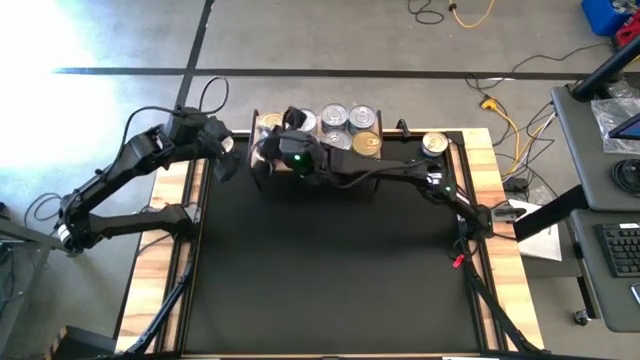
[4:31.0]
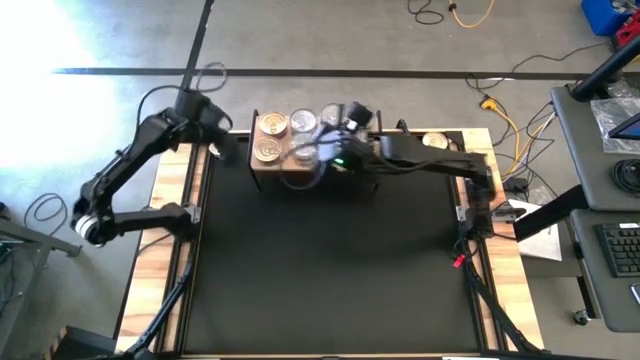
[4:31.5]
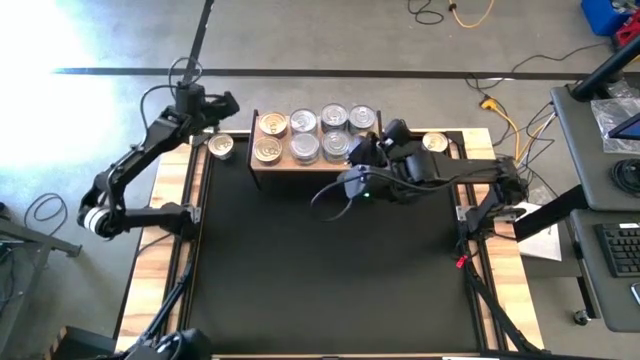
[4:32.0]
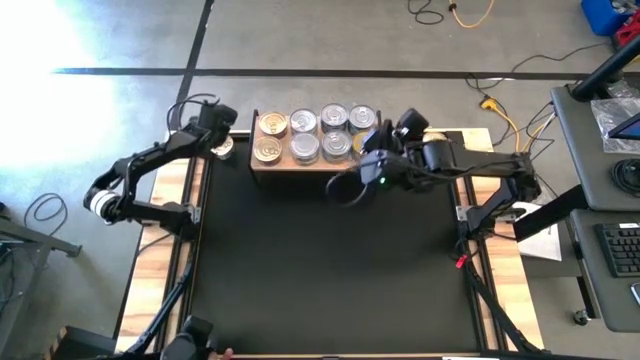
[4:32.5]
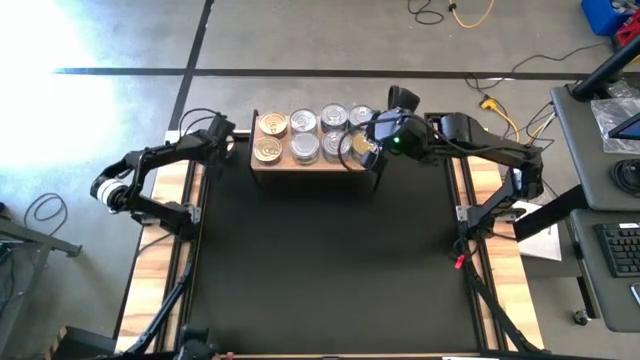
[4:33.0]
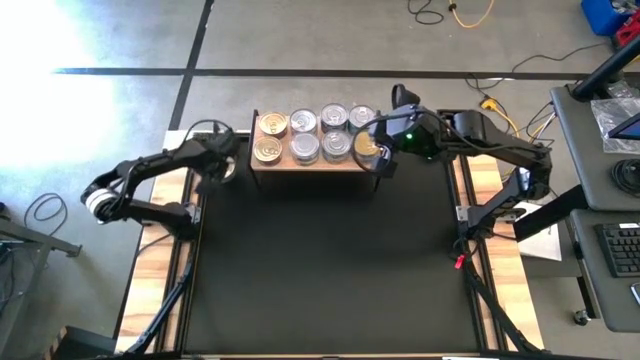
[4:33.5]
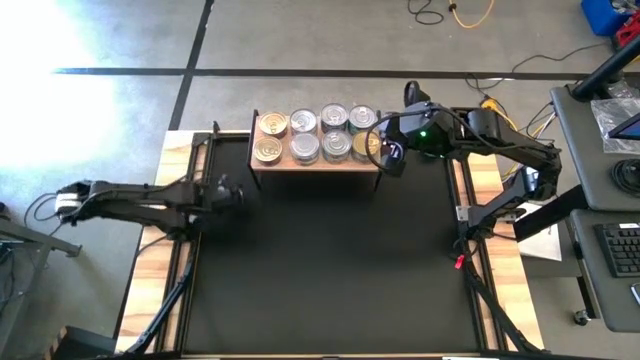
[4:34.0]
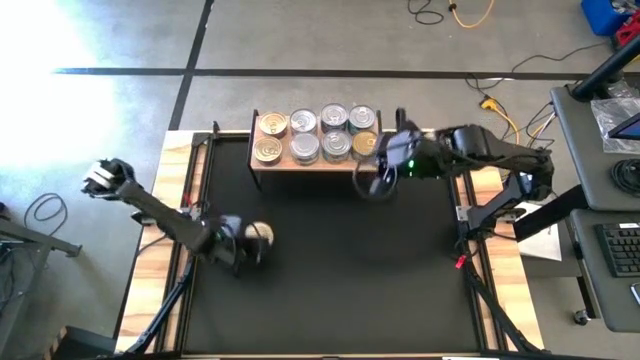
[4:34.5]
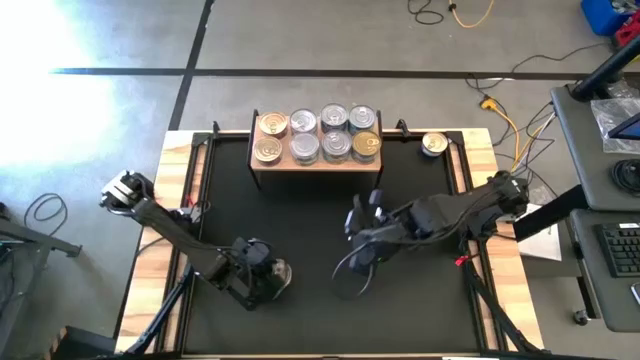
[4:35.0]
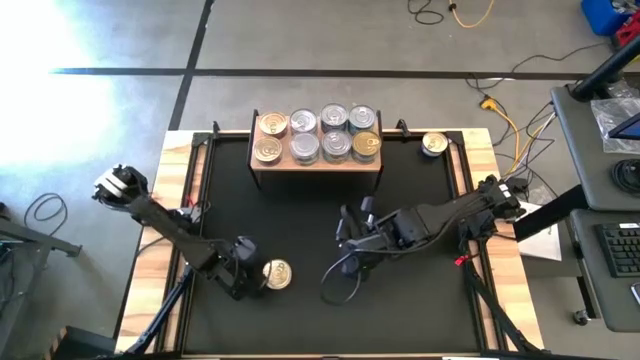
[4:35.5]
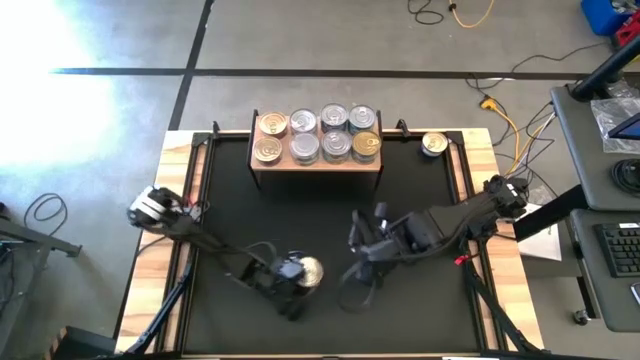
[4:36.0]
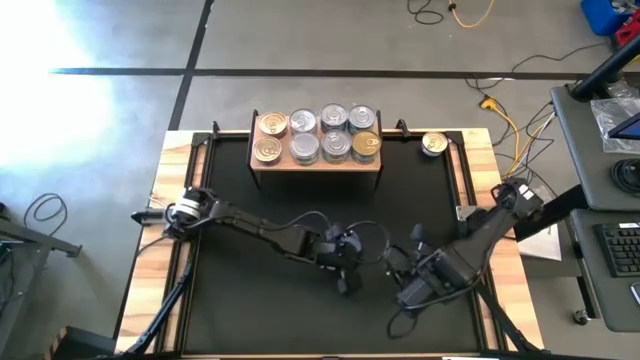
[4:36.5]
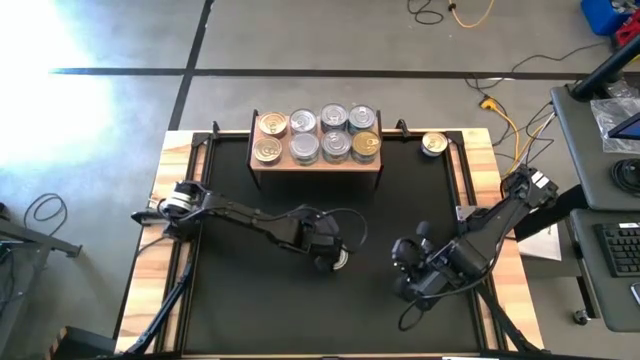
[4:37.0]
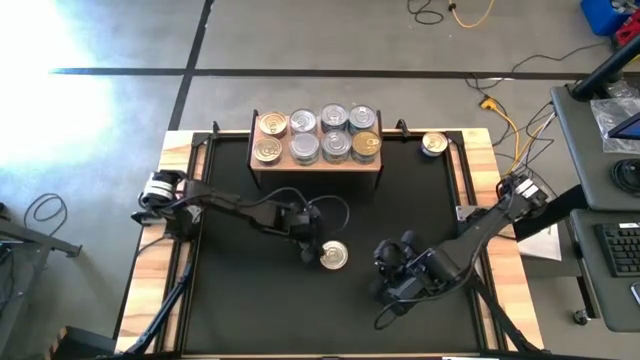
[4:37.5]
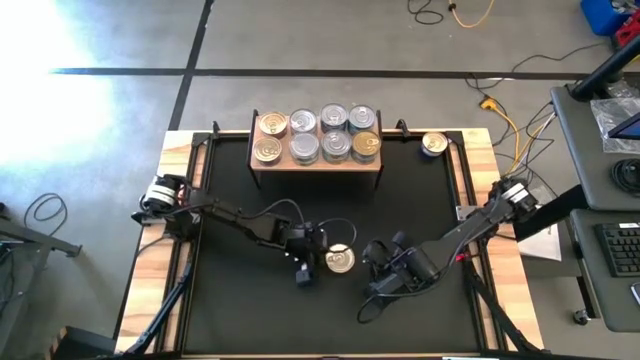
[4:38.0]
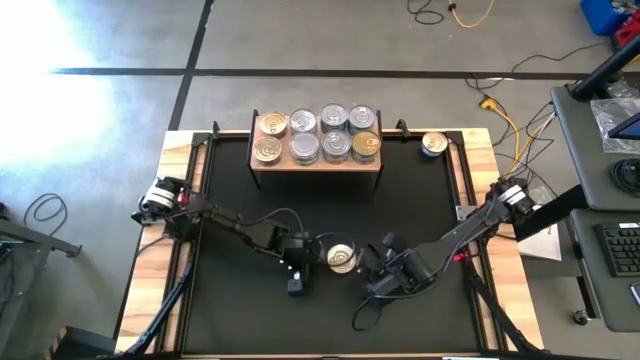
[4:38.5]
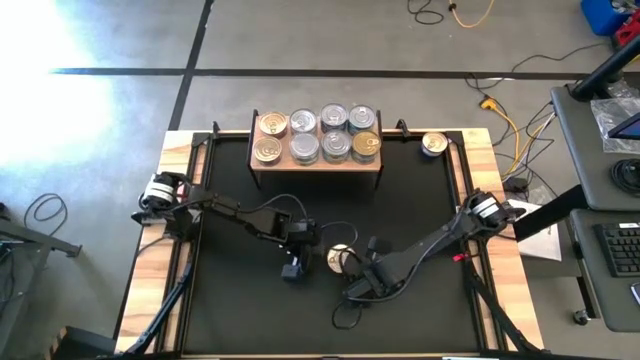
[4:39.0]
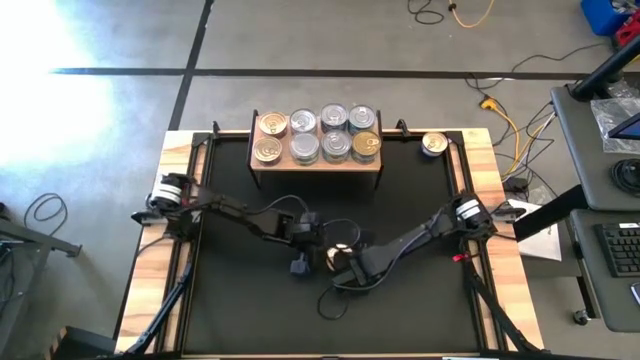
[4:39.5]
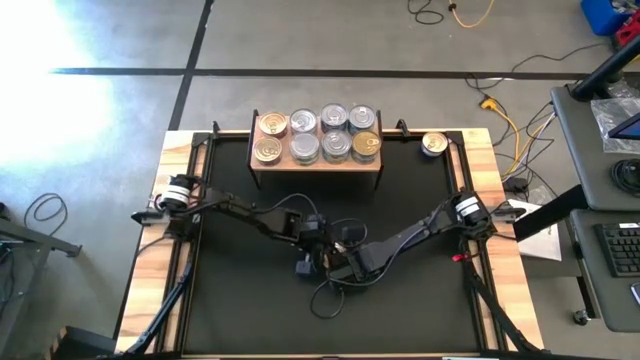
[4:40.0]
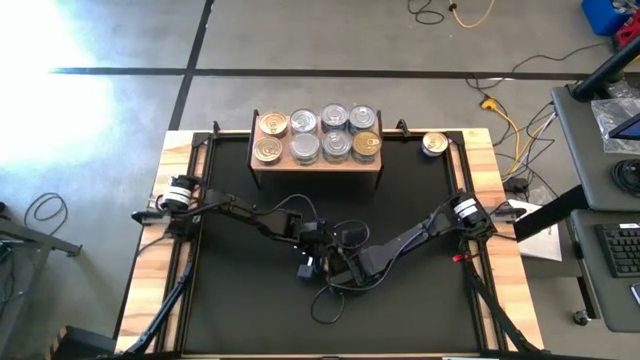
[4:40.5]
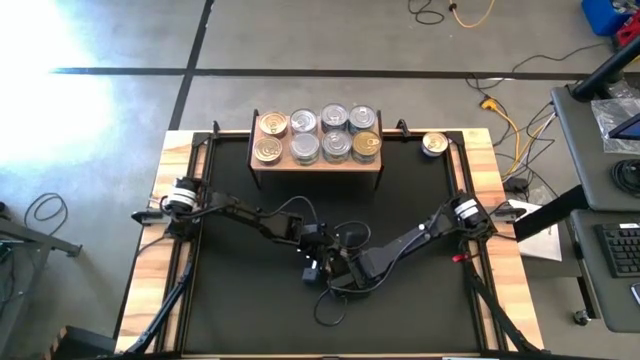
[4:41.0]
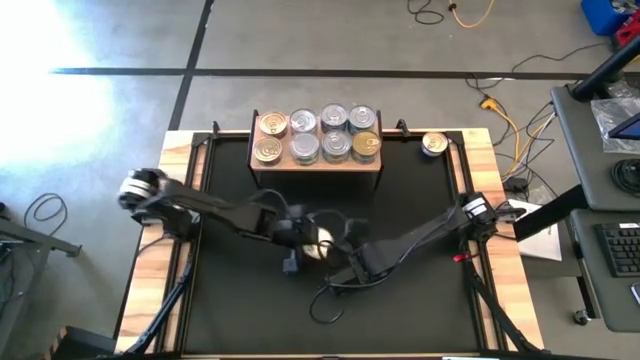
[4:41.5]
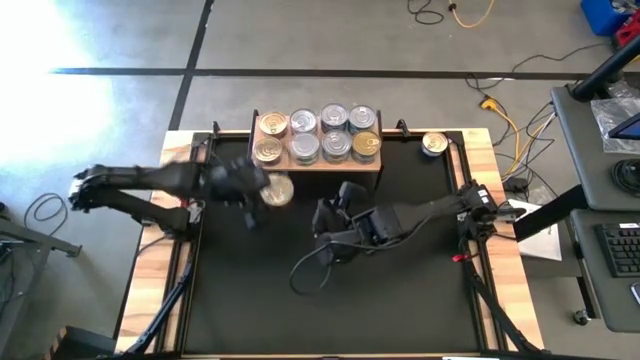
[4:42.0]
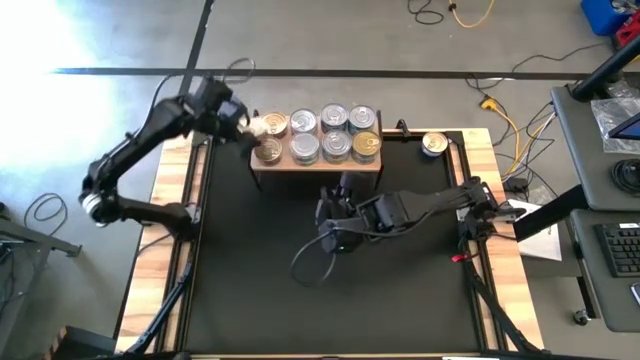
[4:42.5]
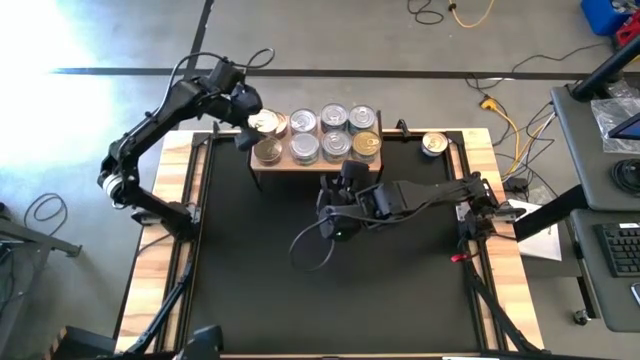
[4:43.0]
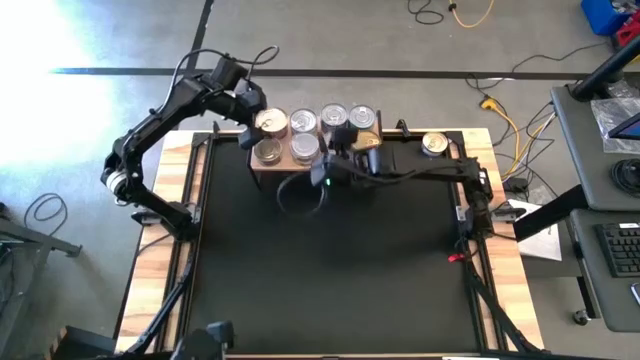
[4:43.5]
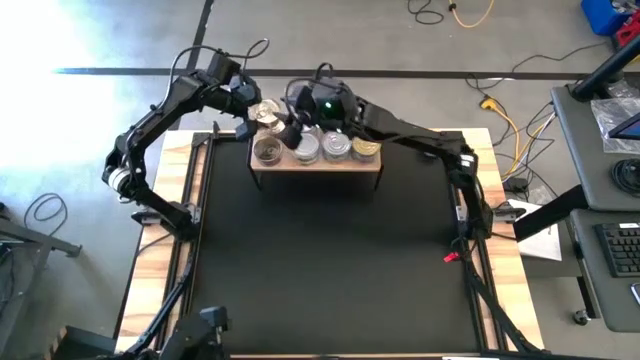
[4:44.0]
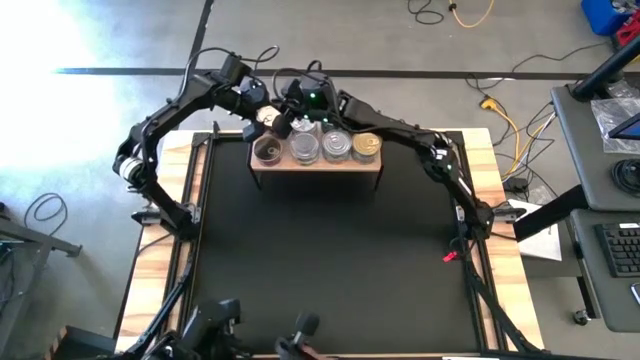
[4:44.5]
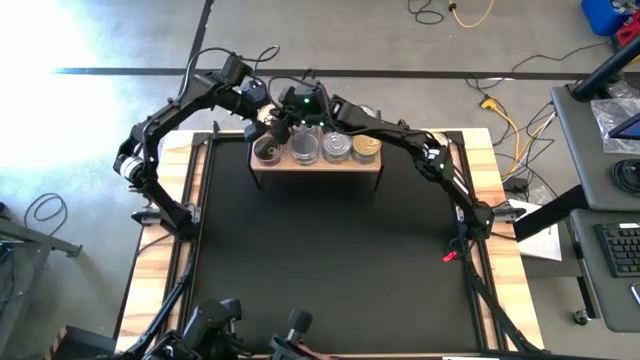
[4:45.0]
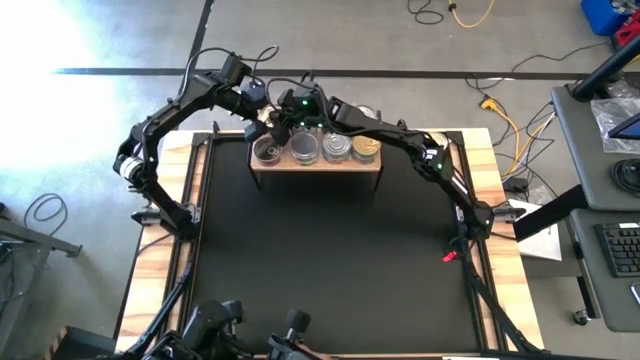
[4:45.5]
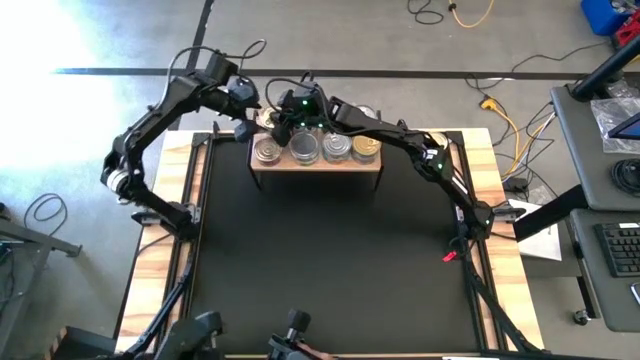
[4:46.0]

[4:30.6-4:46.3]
Task: Stack canned seafood by type on shelf
Stack the left blue pink tuna can on the top of the top blue pink tuna can on the shelf

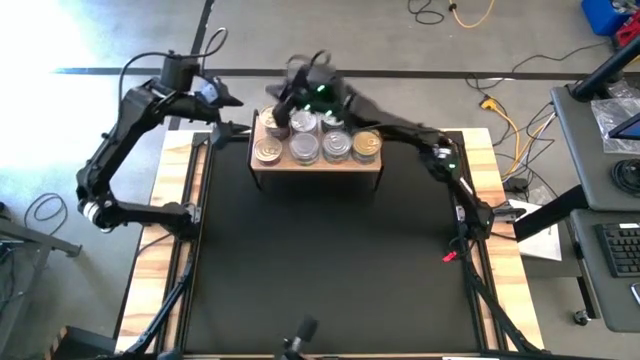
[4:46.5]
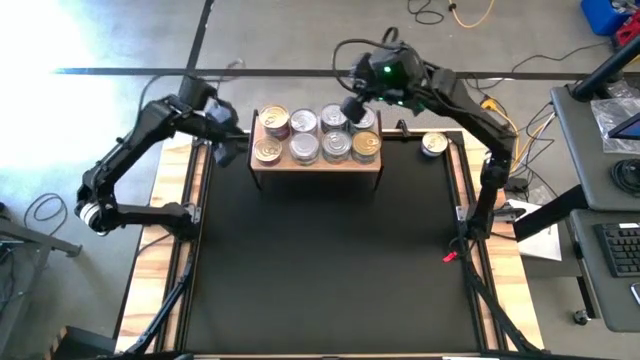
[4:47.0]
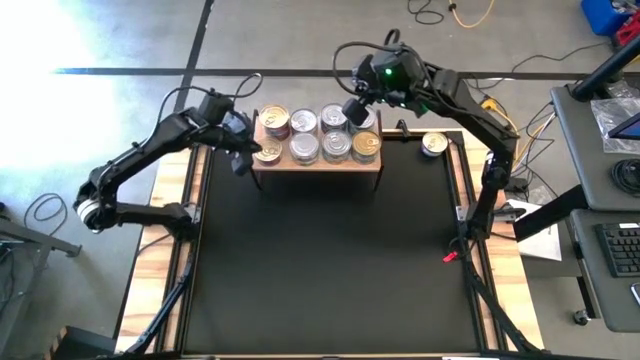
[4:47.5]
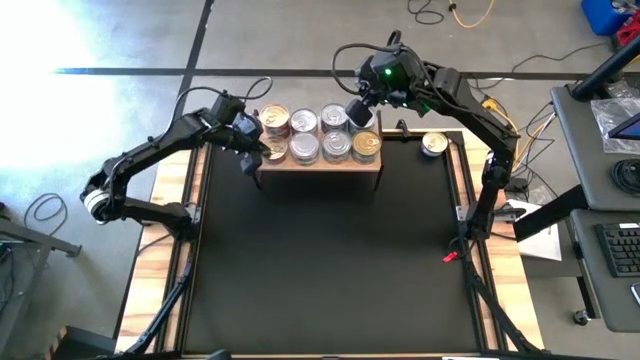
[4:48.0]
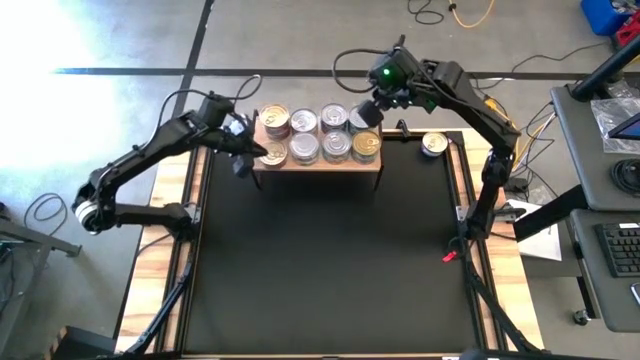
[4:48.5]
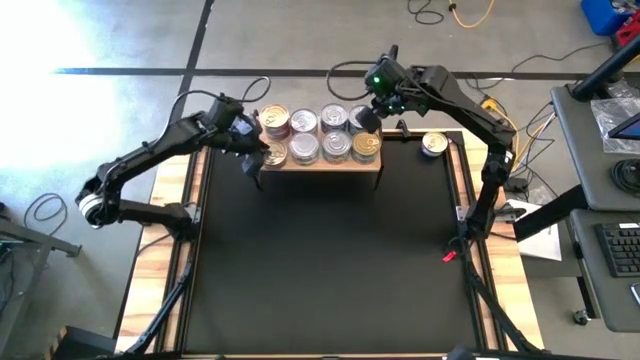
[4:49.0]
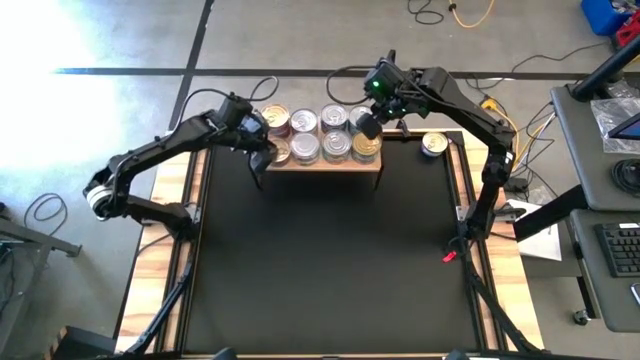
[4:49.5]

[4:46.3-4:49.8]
Adjust the bottom blue pink tuna can on the shelf

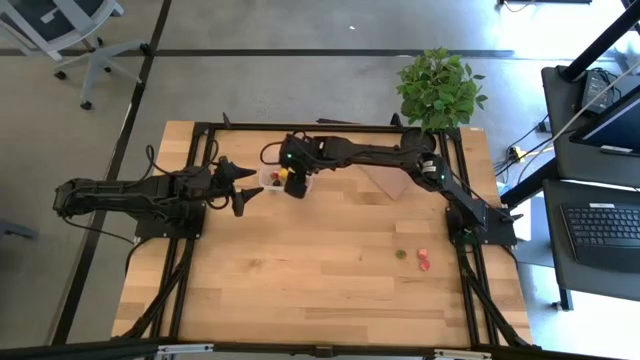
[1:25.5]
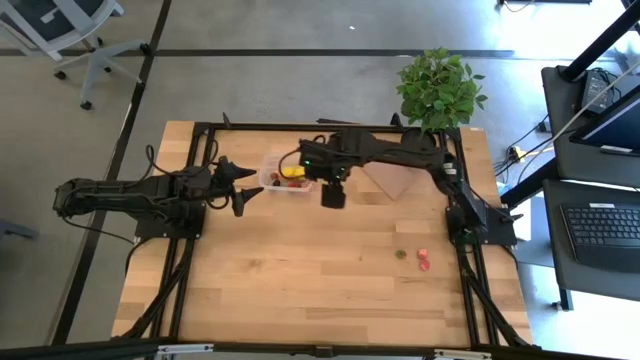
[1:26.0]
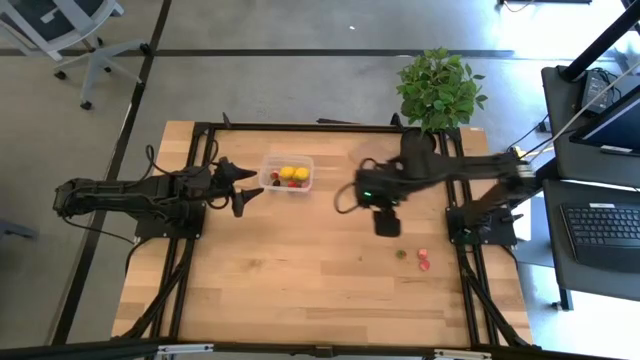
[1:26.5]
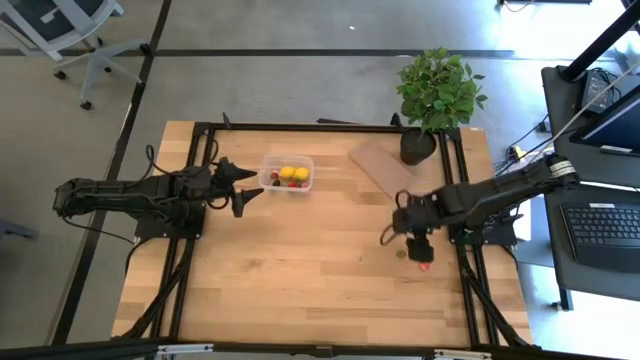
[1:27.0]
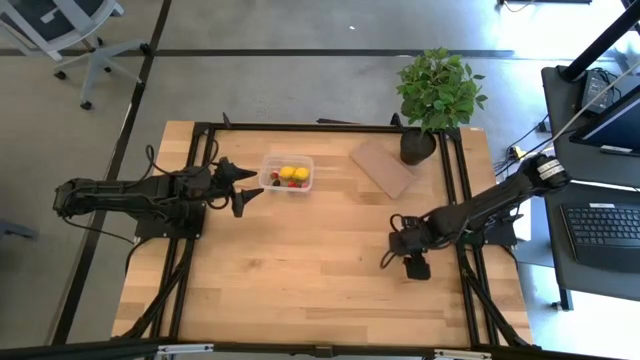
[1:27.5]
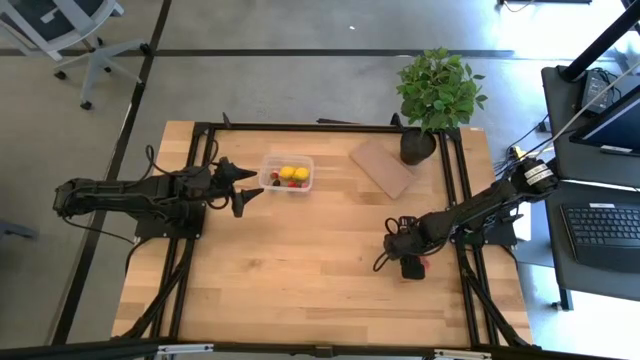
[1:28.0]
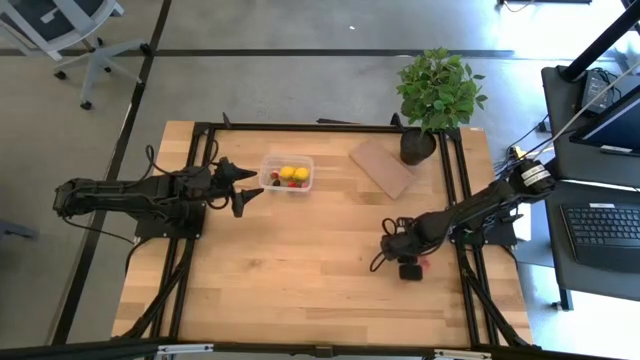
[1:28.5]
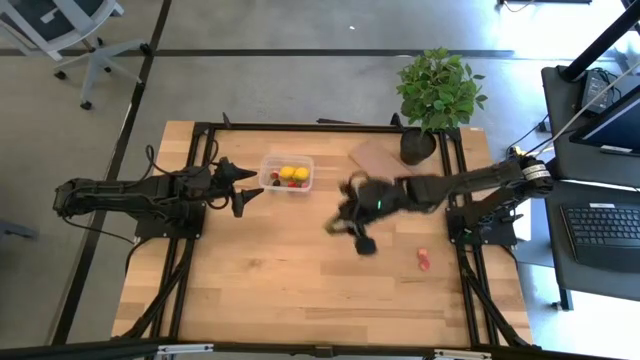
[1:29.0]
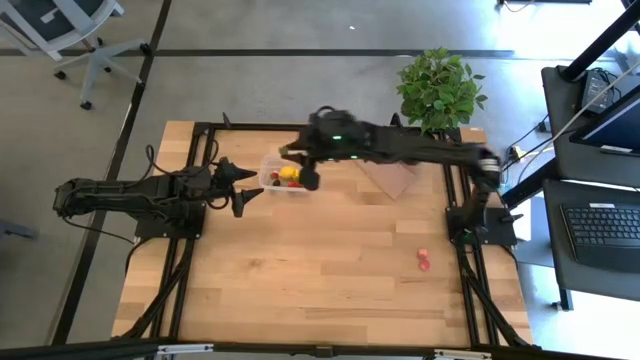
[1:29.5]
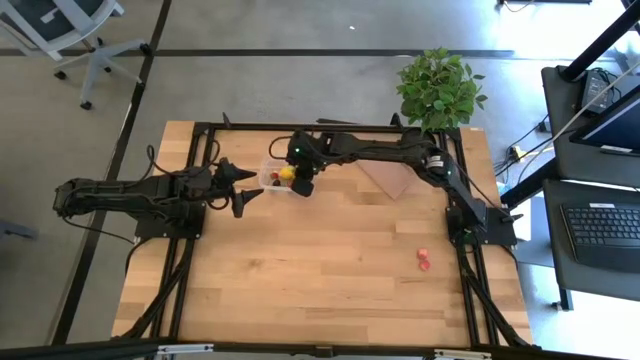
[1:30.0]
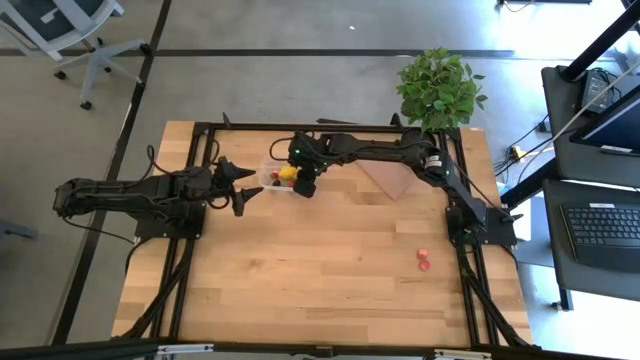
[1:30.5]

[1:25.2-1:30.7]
Task: Pick and placing Produce into tupperware
Put the red strawberry into the transparent bin
